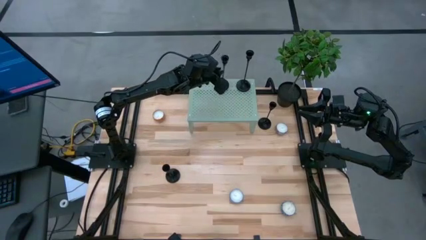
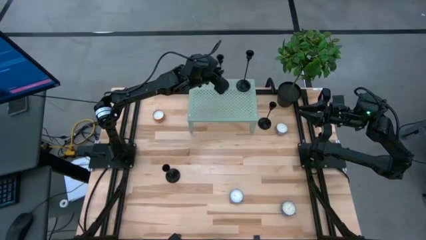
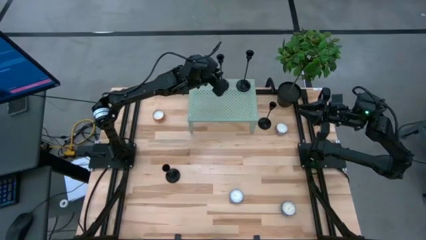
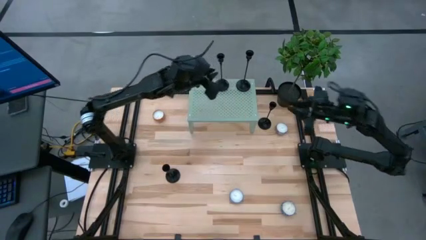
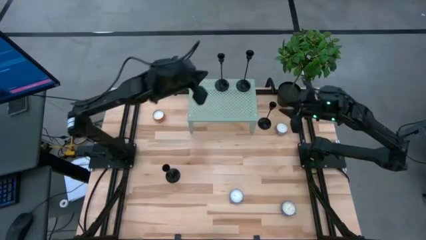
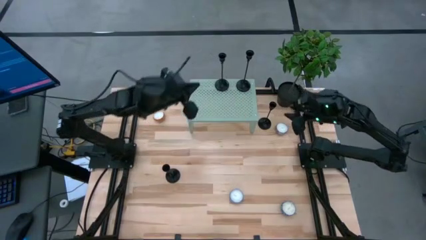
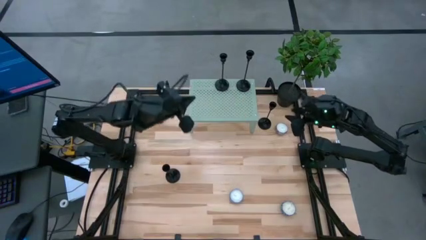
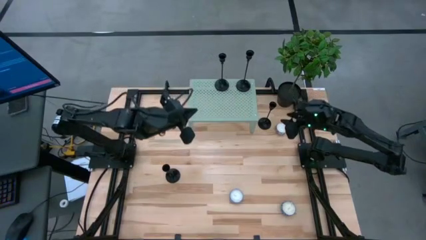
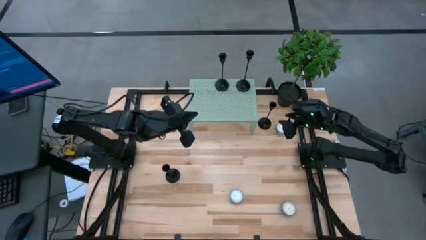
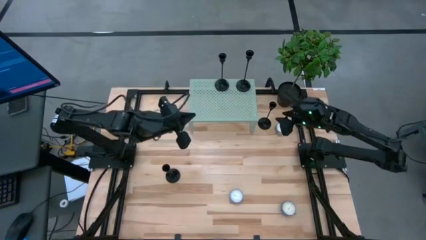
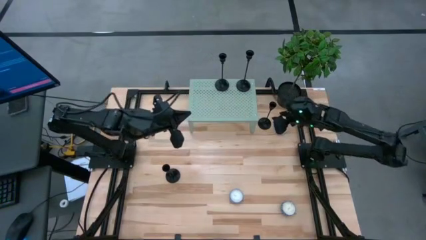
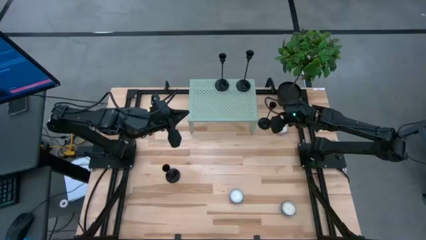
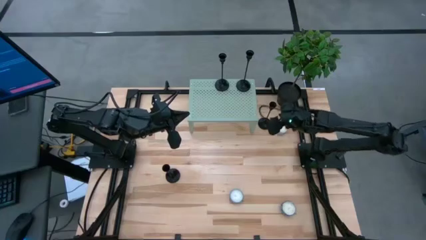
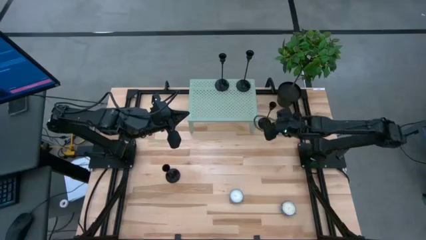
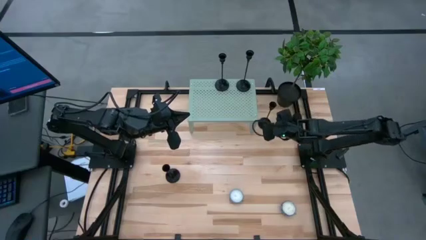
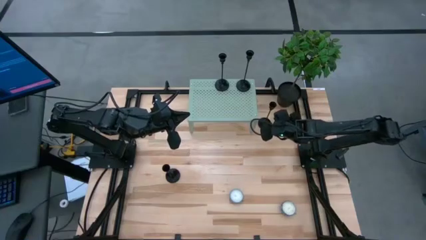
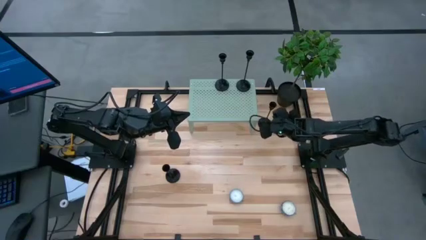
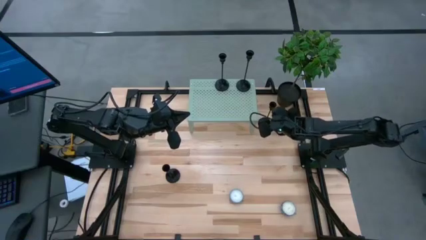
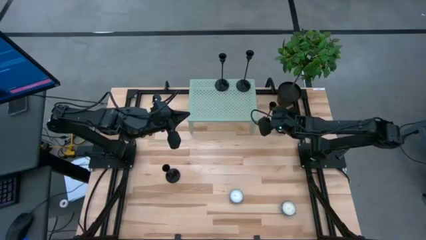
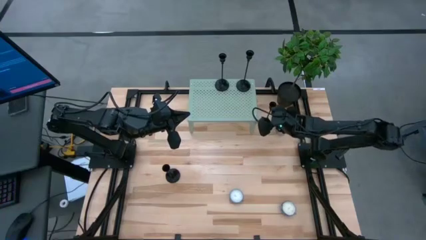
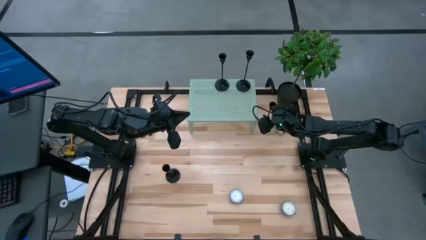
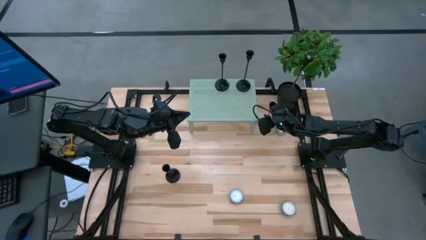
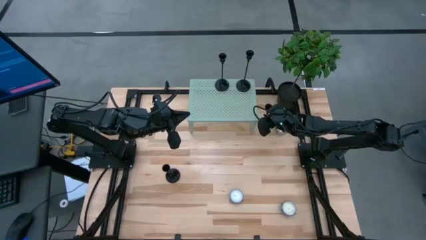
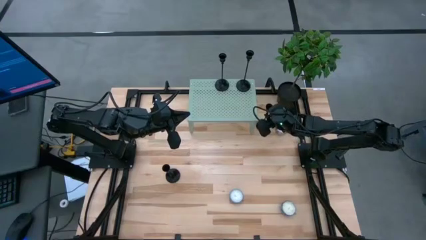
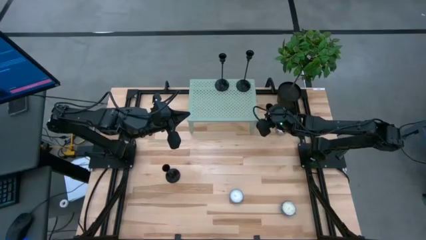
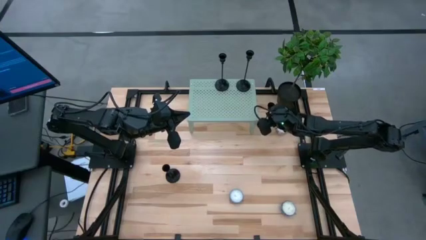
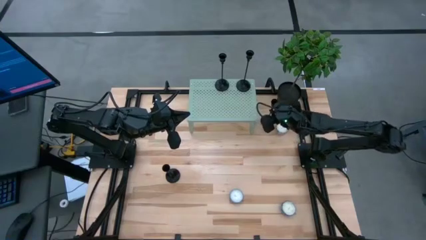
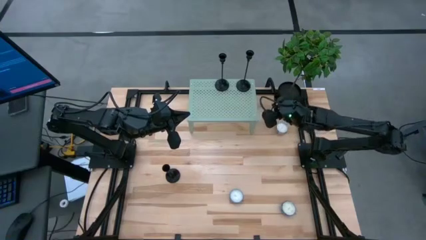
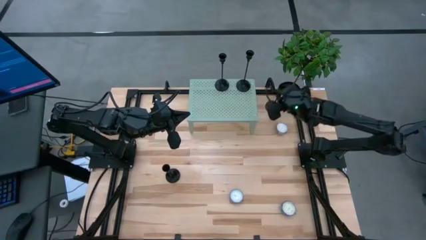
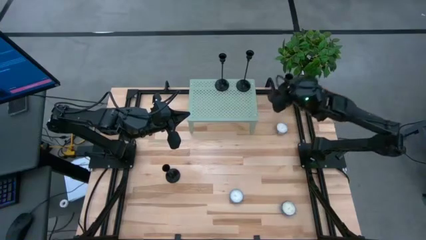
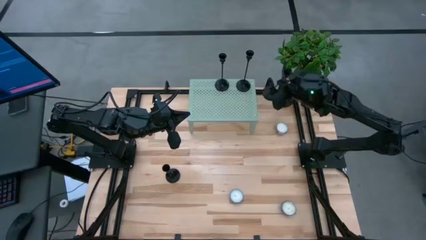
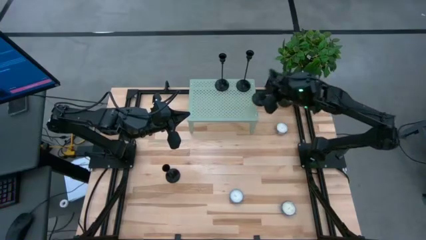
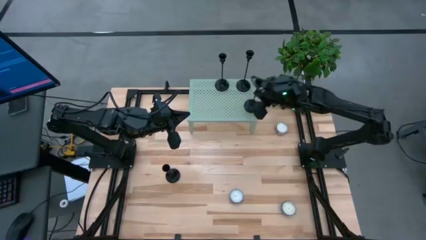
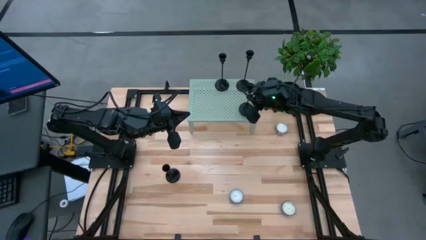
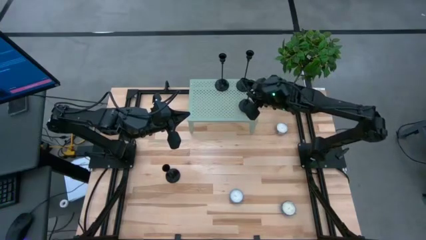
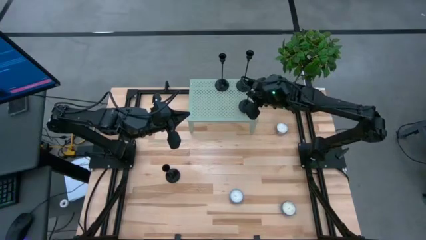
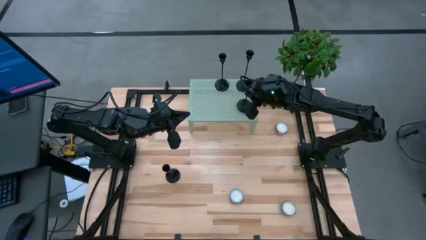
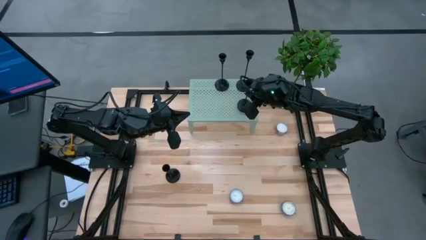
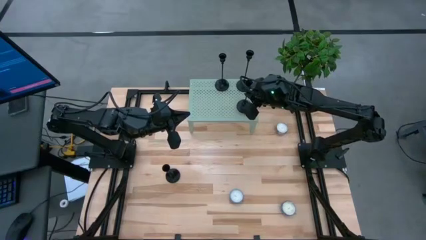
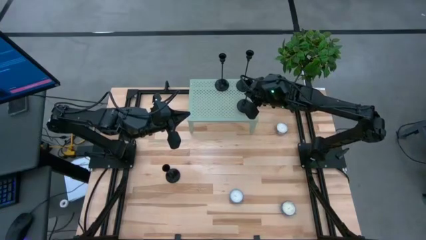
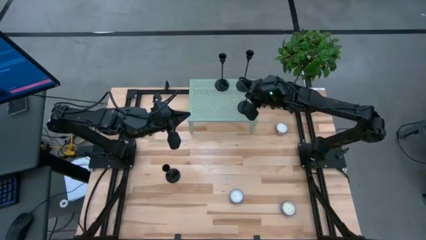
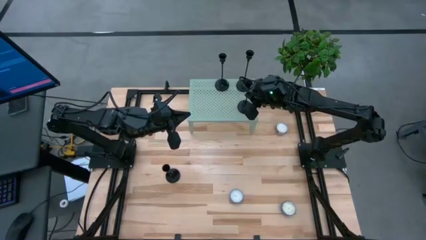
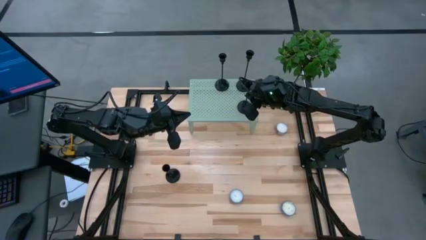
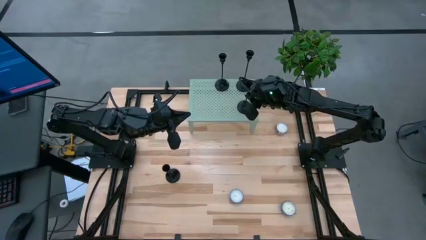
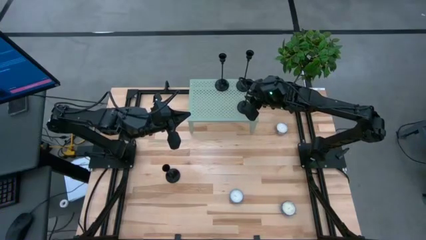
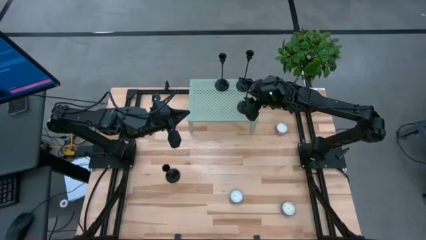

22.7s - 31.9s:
Task: Pick & Place candle stick holders
Put the black candle holder on the shelf

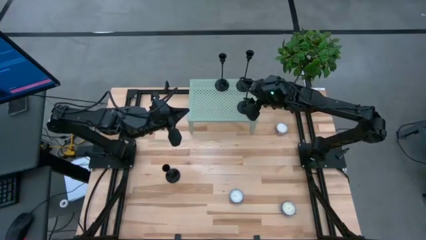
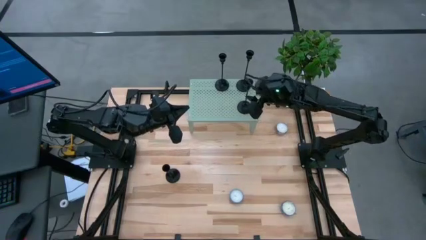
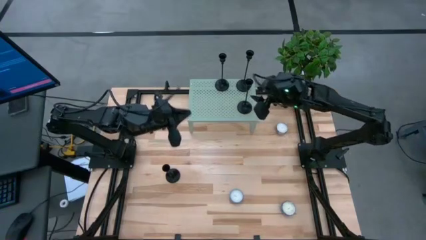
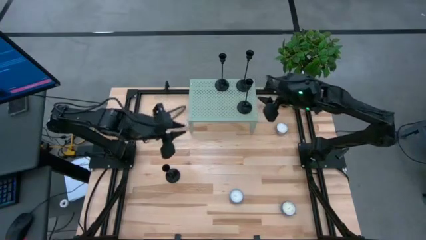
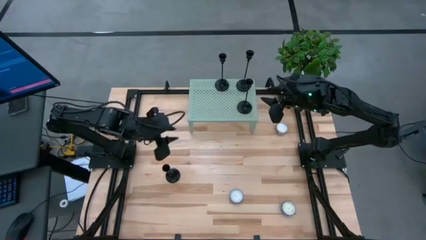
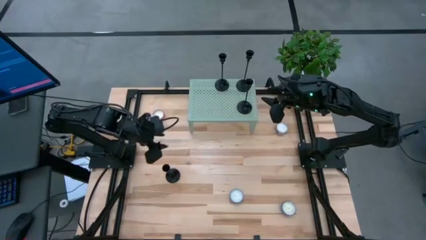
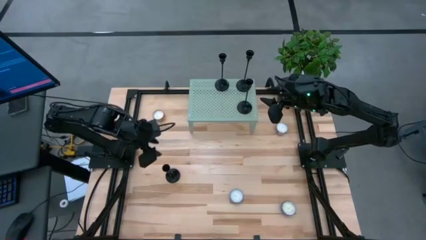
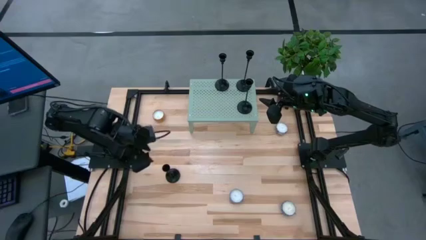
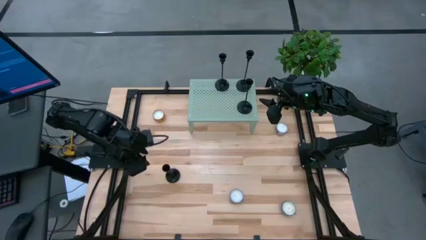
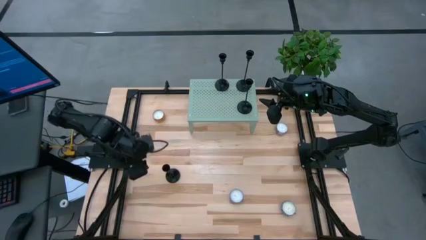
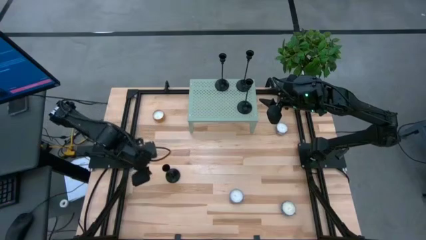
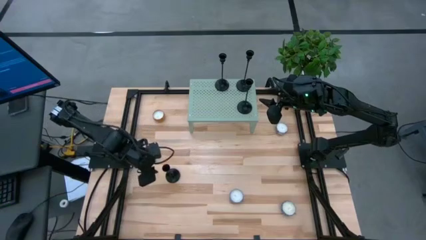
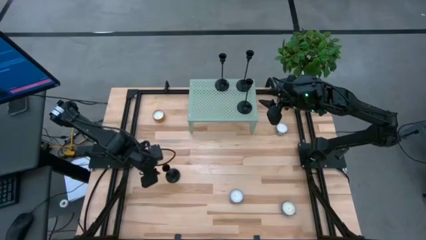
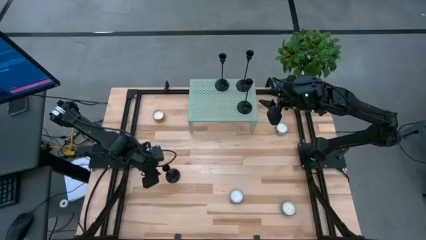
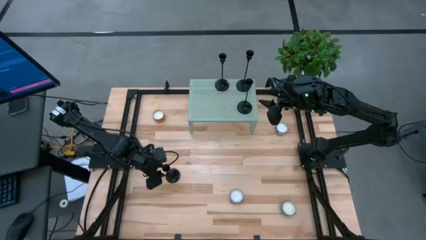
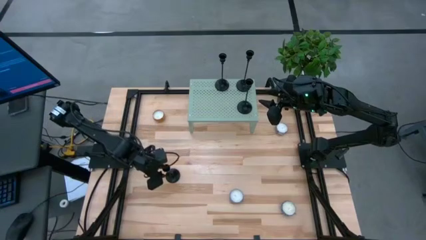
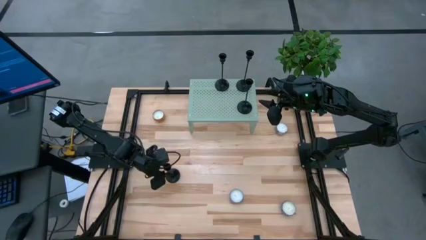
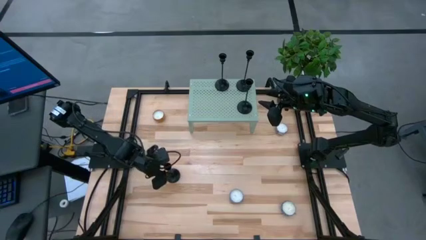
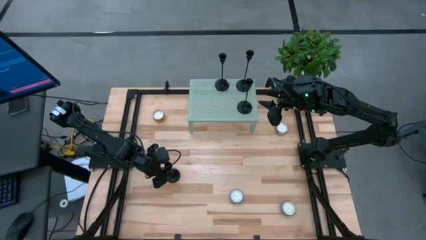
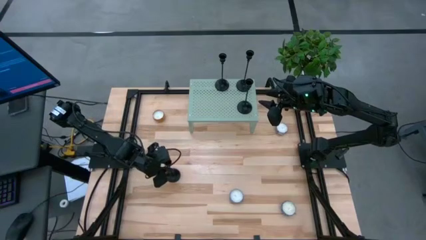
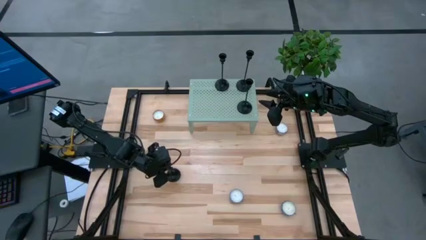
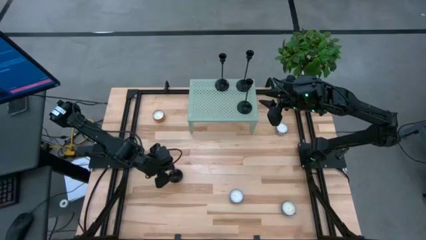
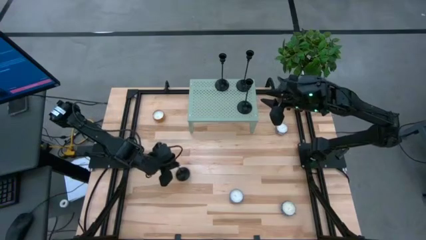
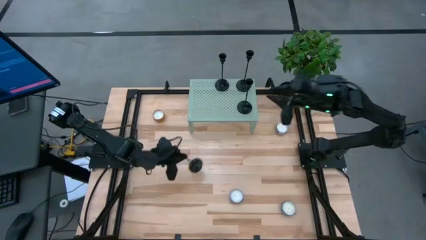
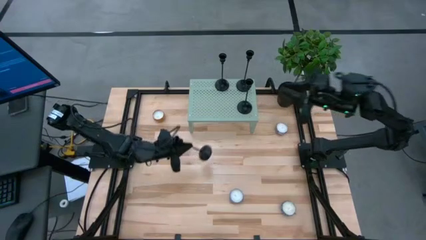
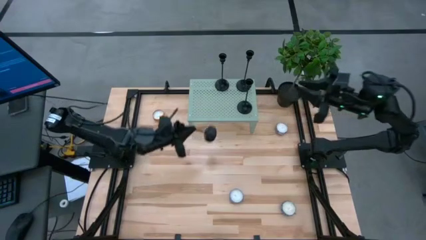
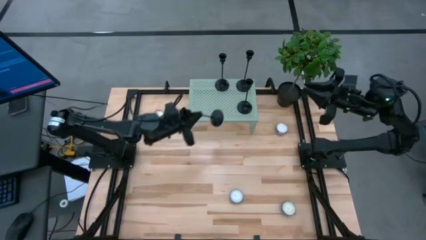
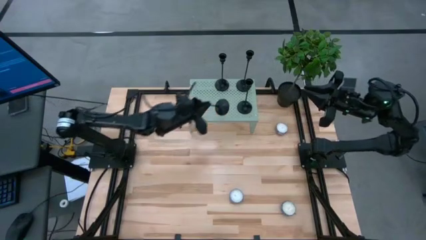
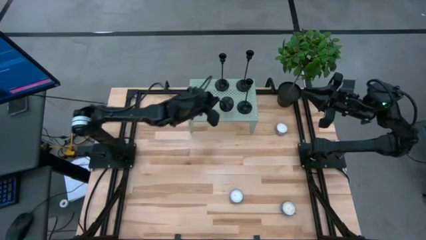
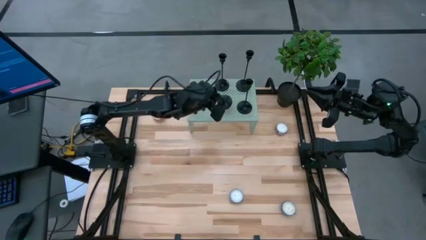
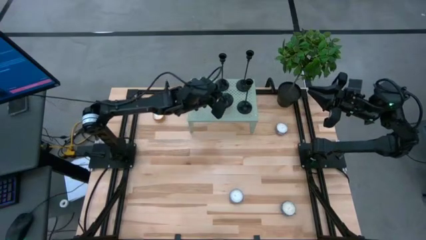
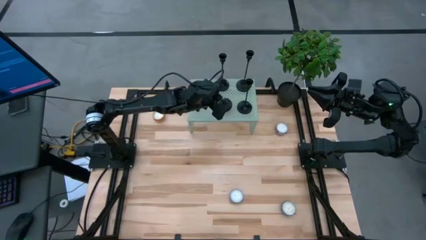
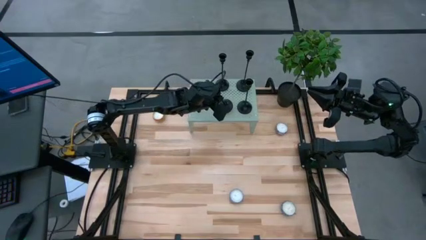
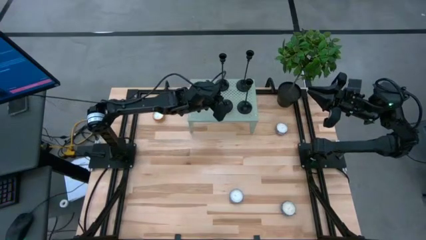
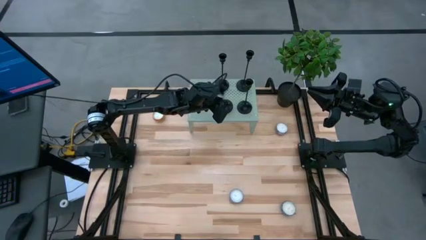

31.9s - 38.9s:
Put the black candle holder on the shelf
